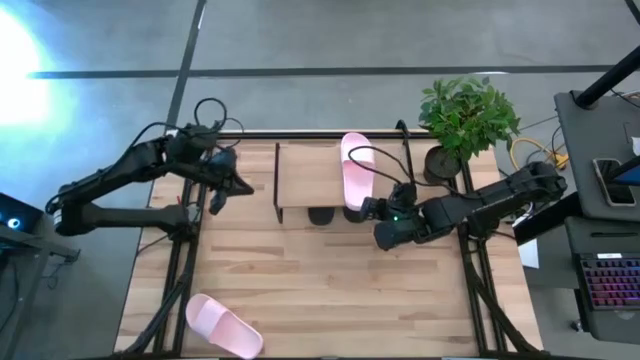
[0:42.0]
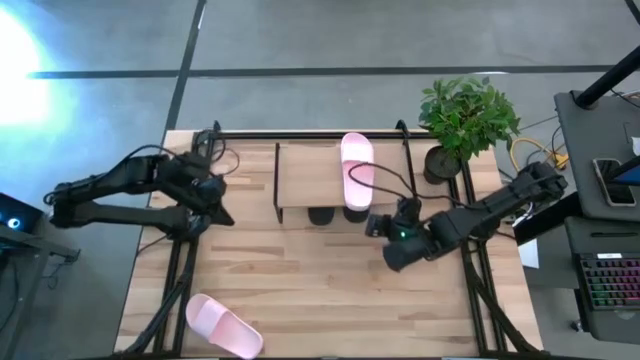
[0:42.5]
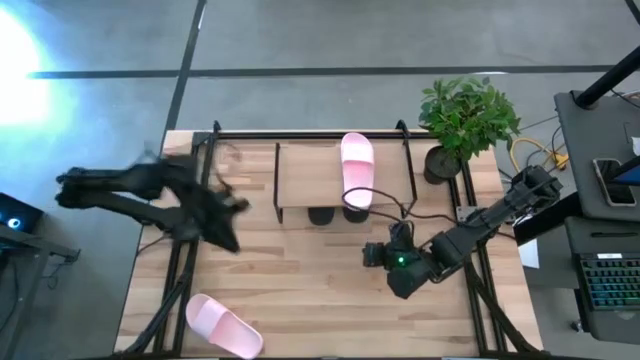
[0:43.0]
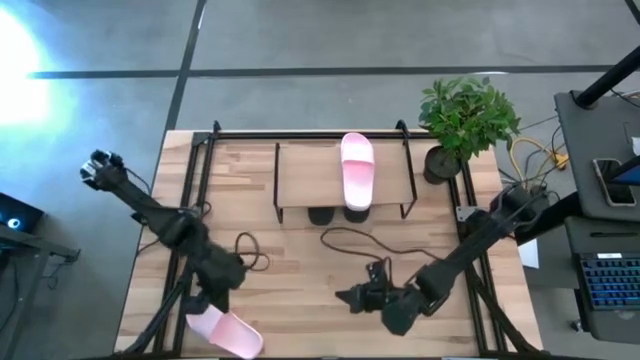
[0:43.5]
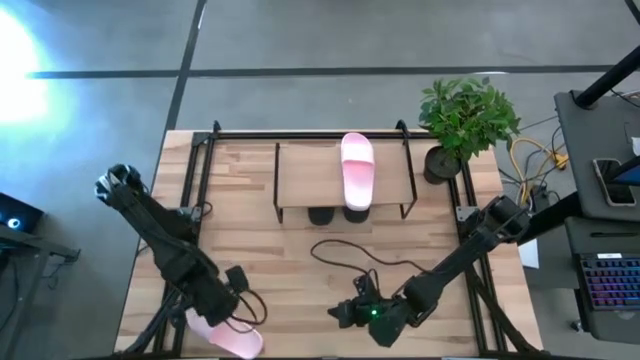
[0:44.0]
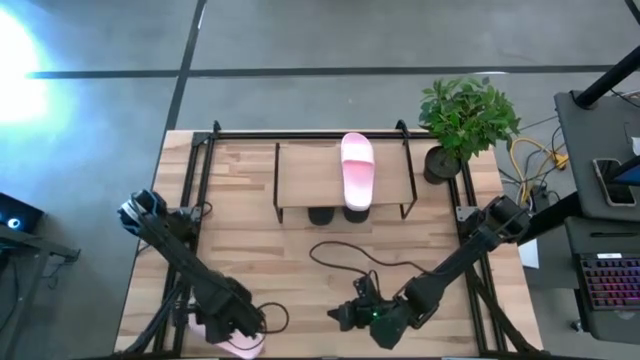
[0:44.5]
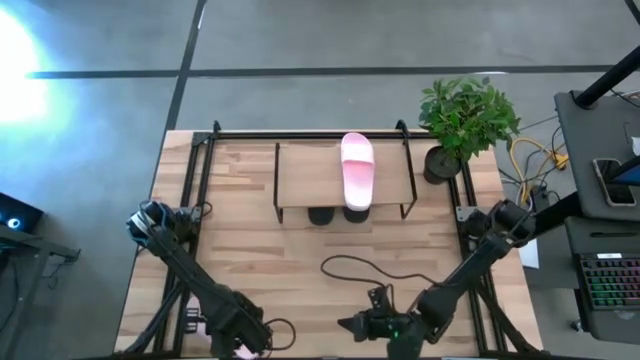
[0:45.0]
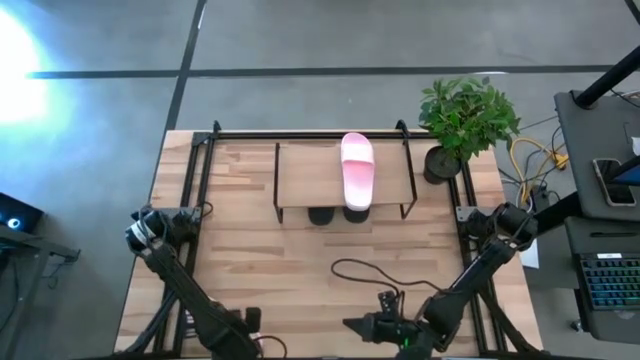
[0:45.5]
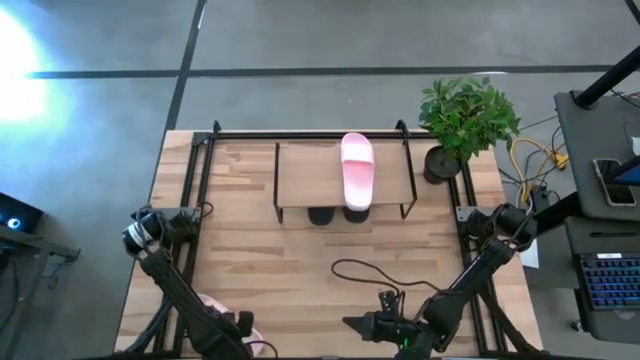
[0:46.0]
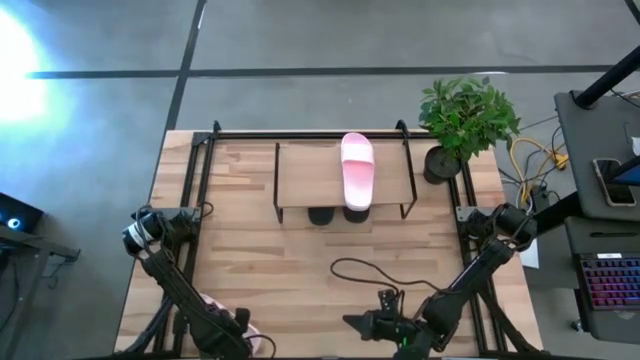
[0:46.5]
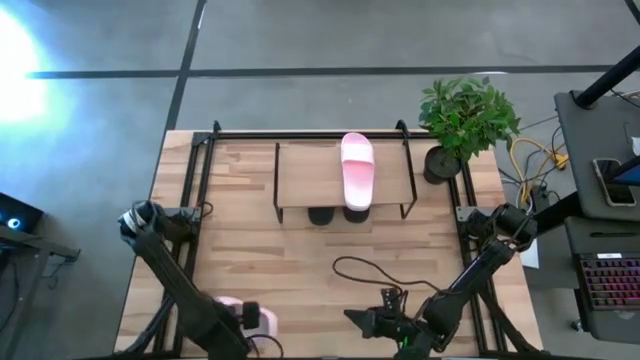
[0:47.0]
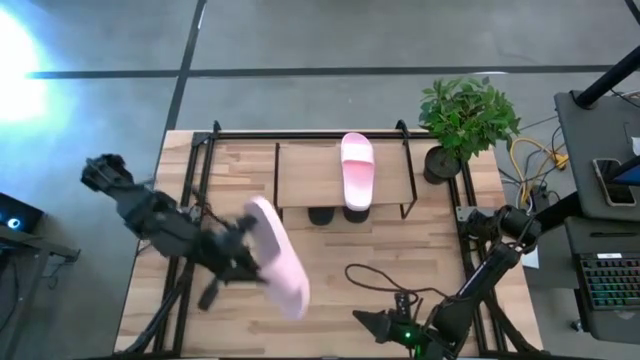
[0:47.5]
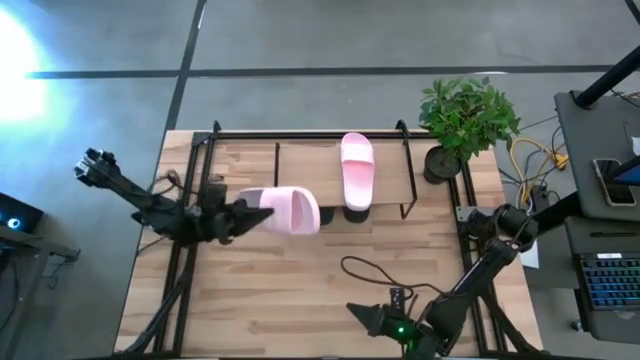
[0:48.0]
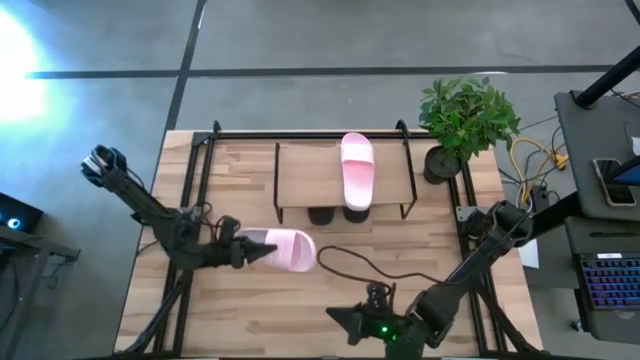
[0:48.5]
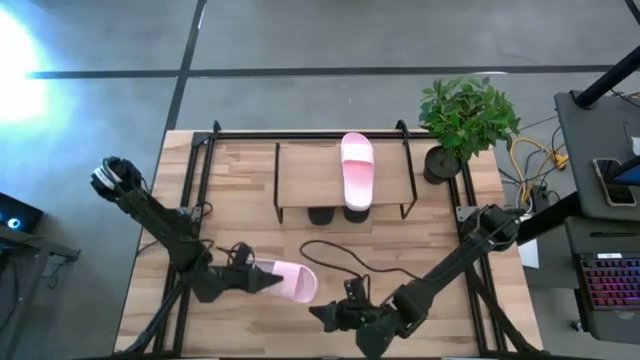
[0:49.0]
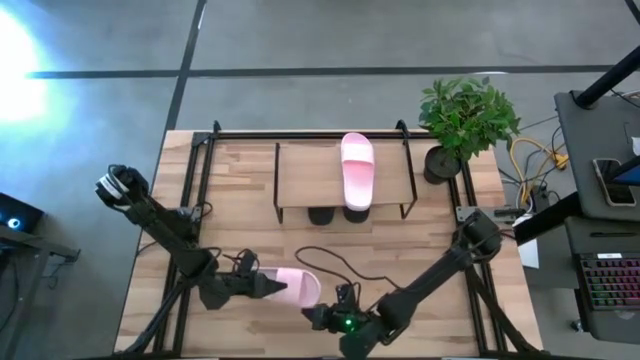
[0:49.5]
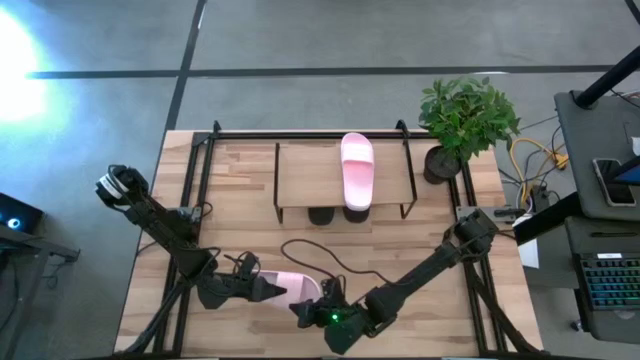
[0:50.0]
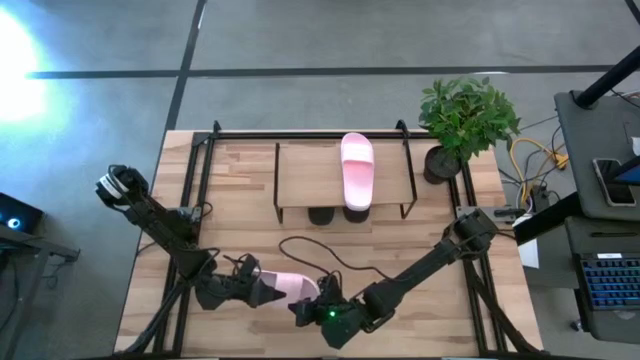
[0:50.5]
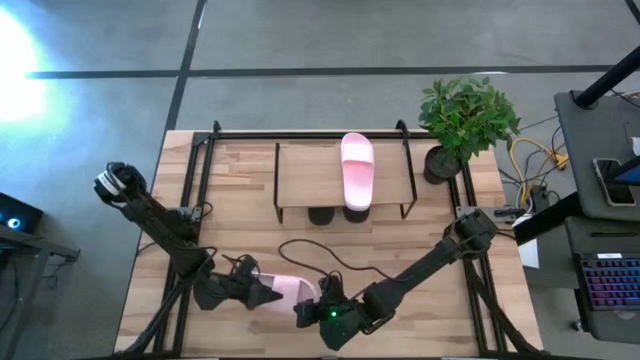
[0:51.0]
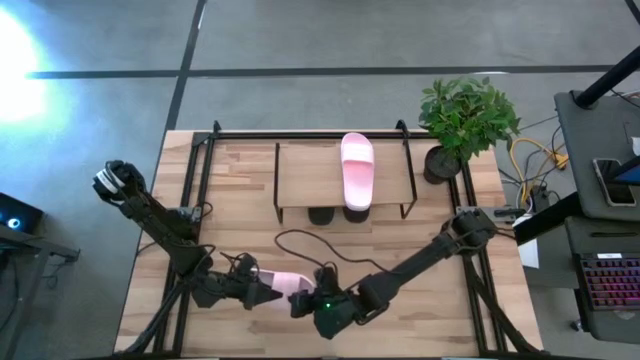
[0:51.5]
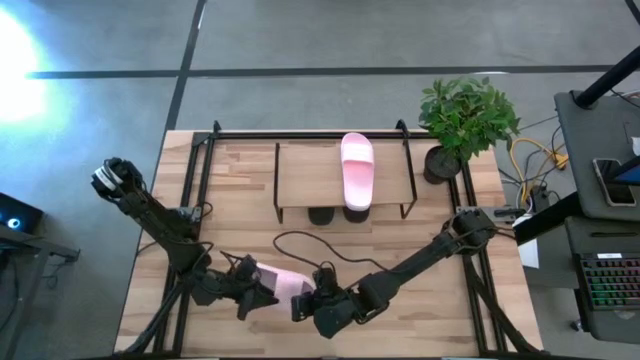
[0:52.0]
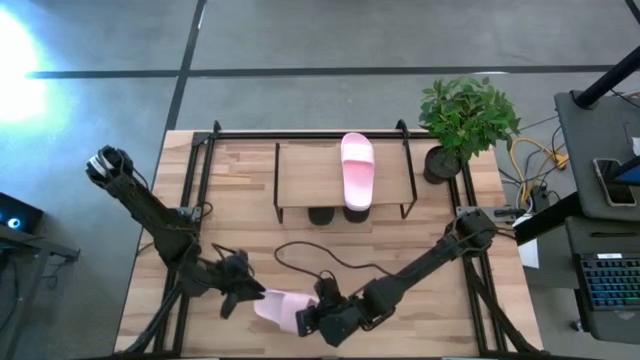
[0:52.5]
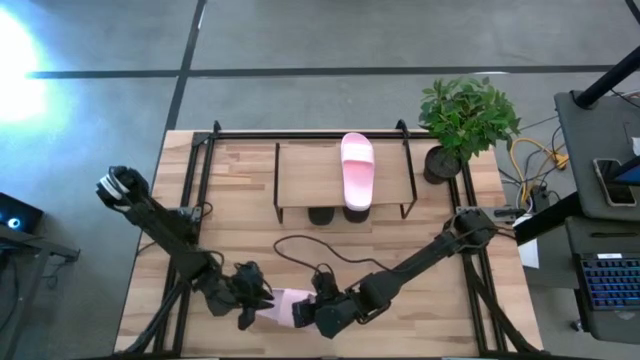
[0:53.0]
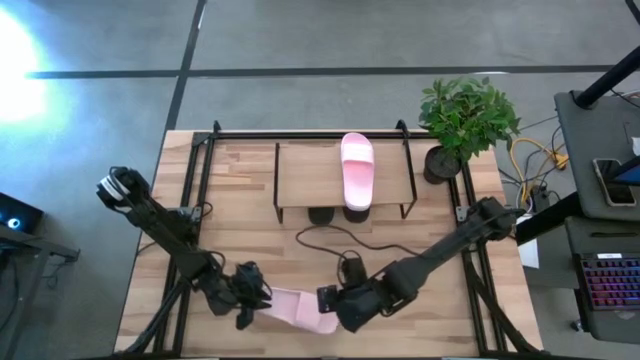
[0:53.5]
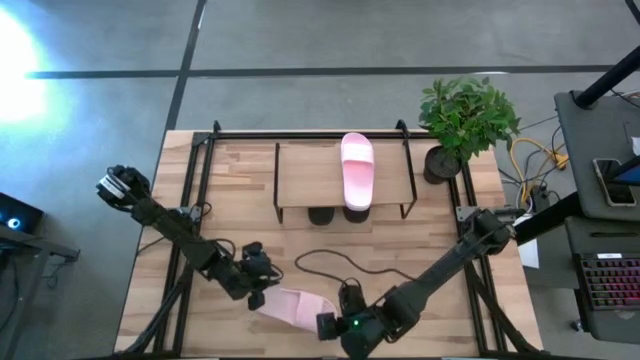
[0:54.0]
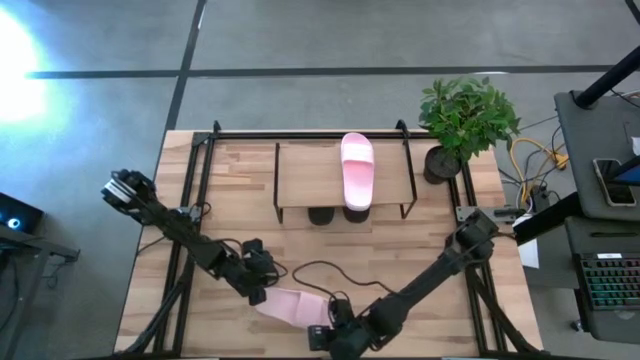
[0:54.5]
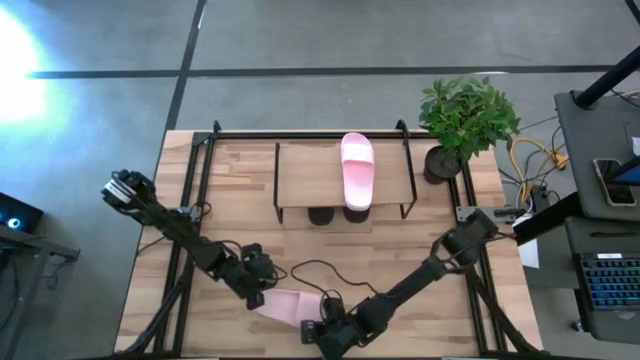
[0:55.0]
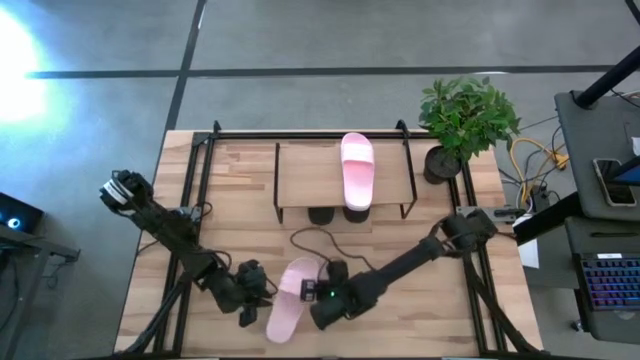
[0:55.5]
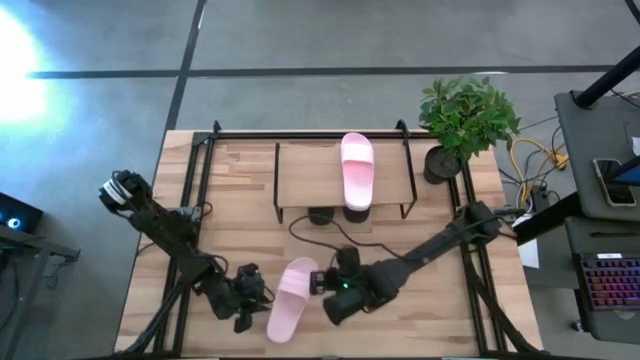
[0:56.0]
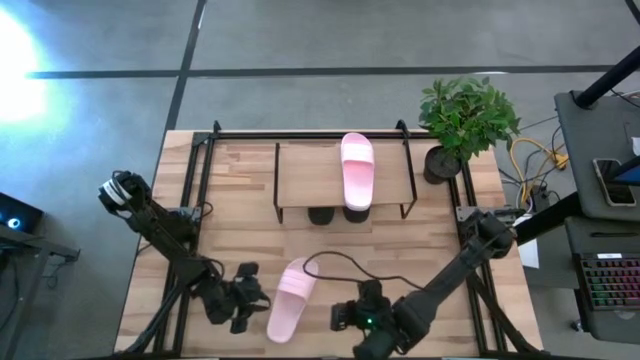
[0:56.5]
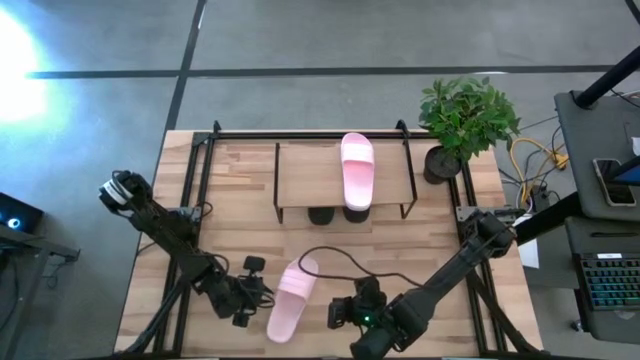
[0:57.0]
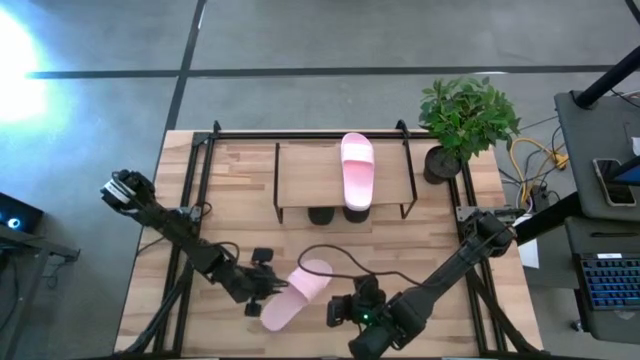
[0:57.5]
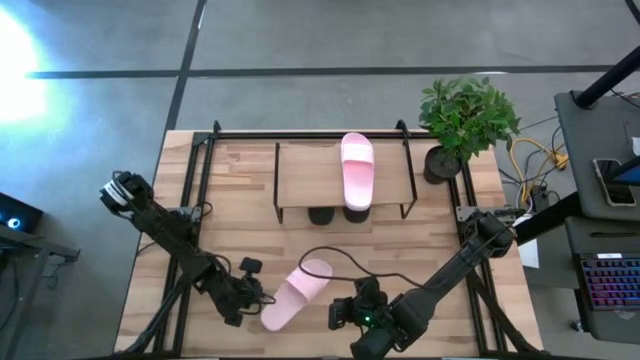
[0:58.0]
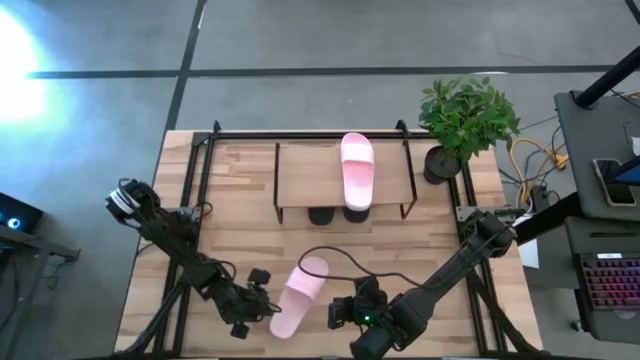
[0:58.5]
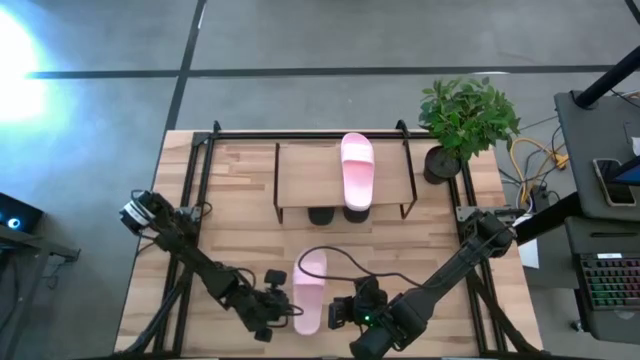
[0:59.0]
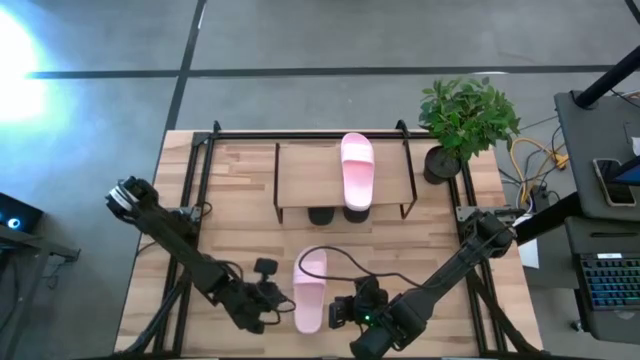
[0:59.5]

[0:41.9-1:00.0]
Task: Pick and place slides into the shelf
Put the pink slide on the shelf

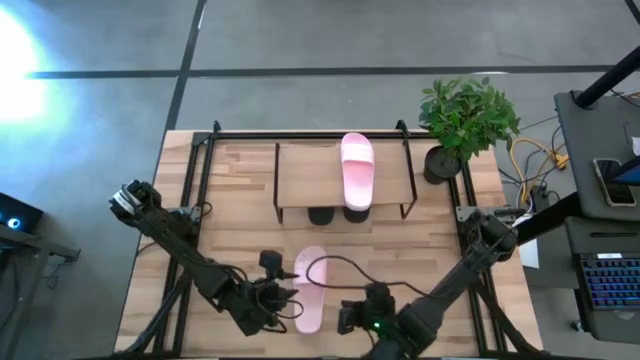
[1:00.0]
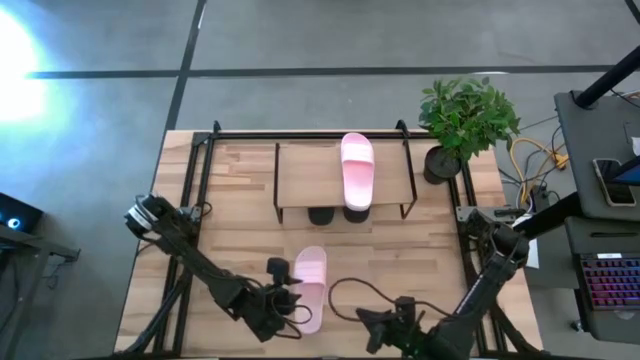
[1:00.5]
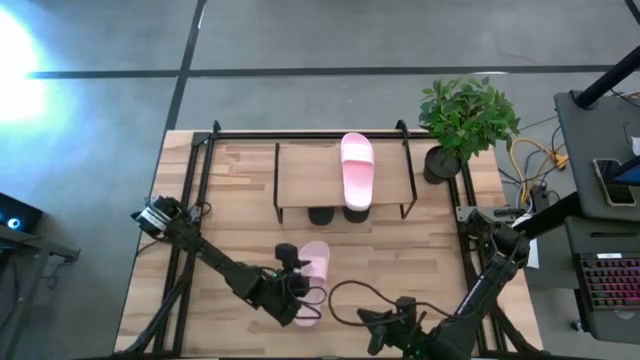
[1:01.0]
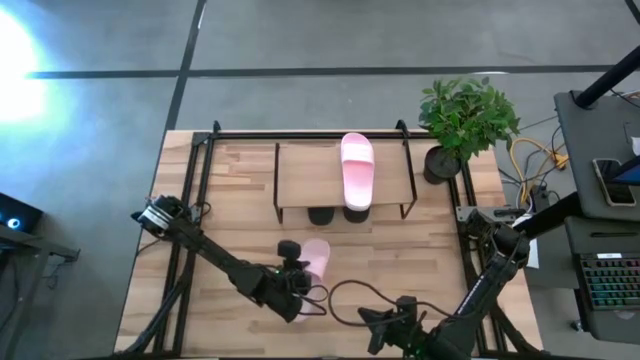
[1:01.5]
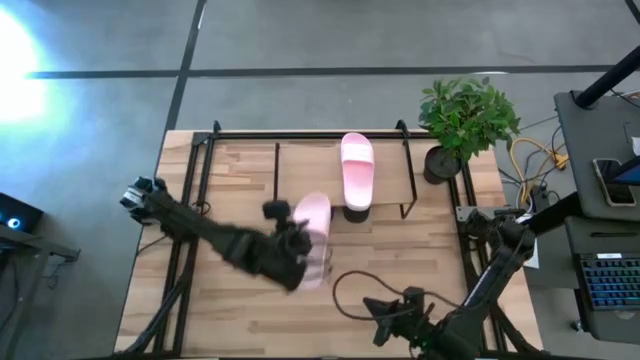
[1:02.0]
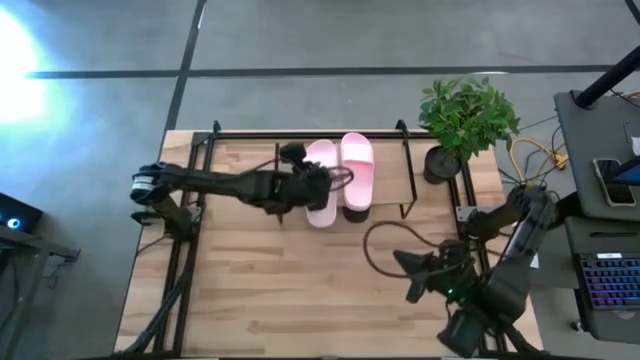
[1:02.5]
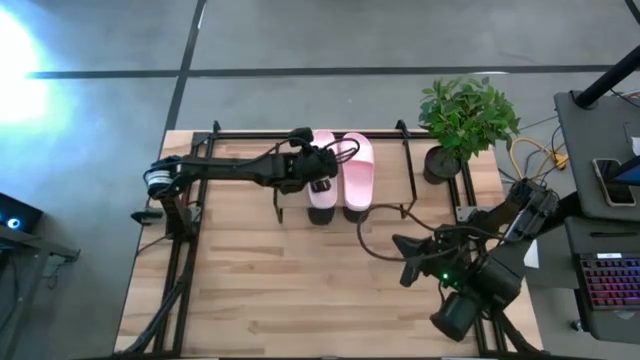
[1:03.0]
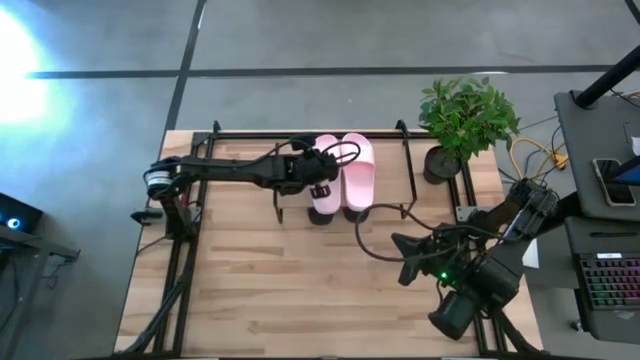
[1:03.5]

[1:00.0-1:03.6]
Put the pink slide on the shelf
